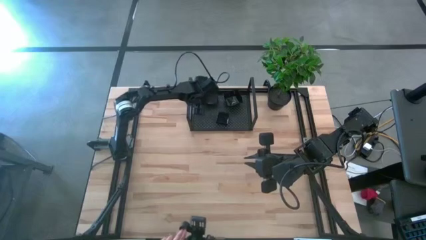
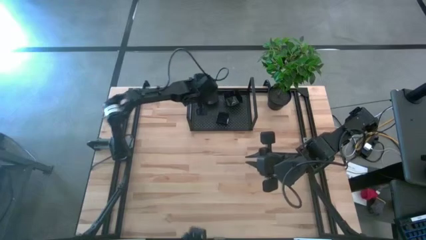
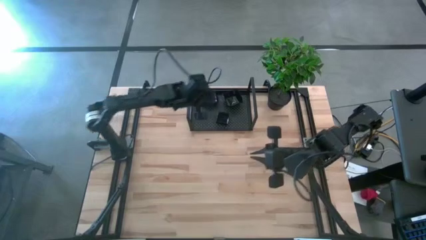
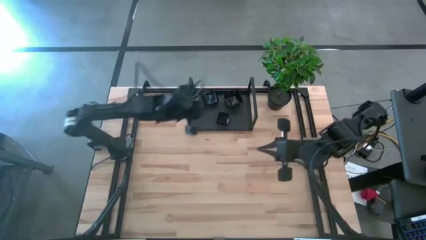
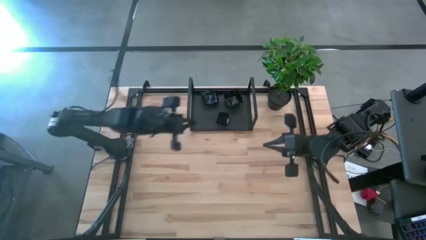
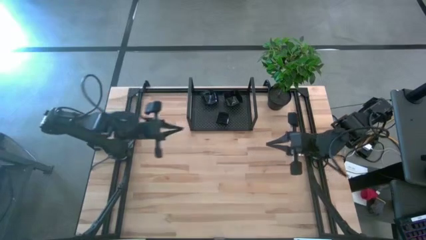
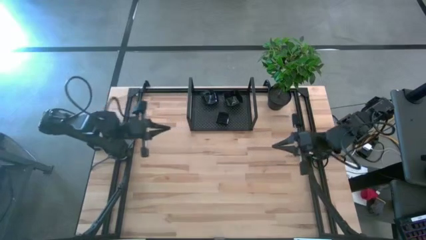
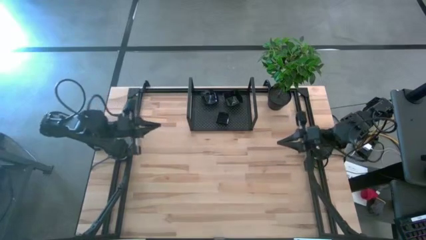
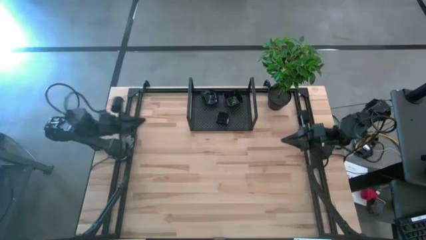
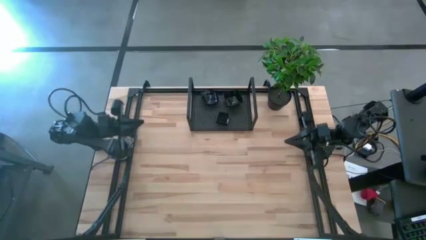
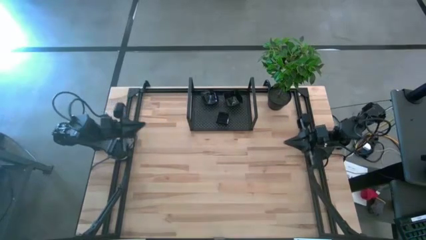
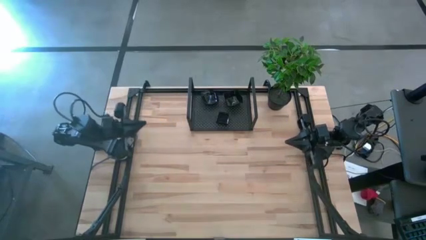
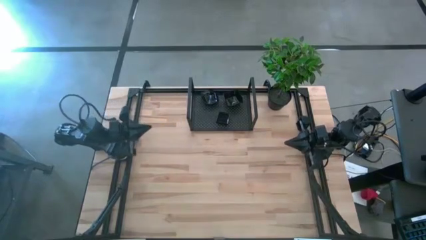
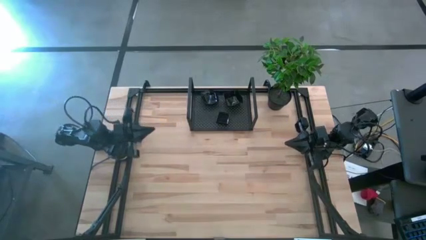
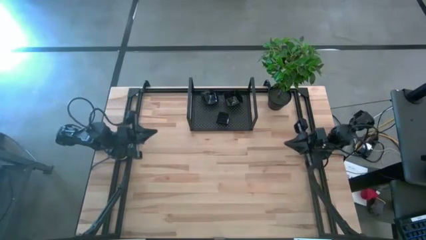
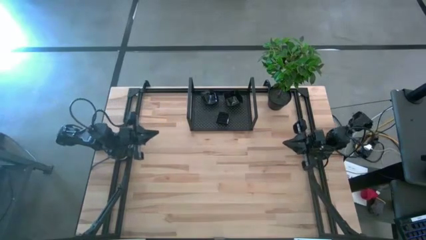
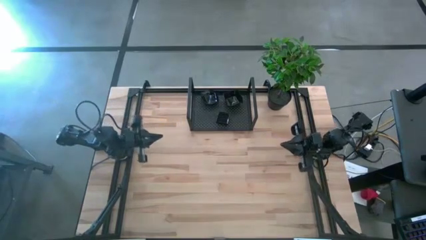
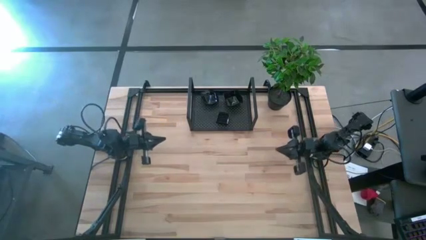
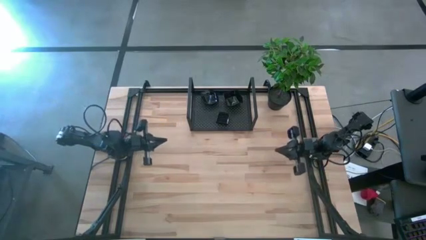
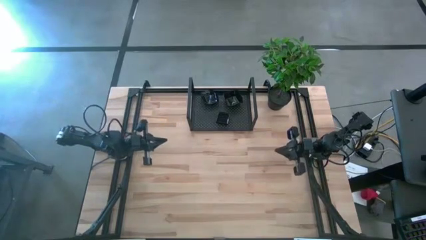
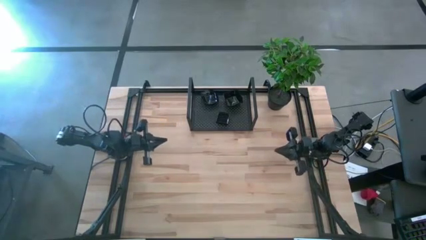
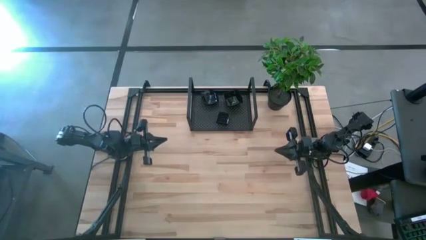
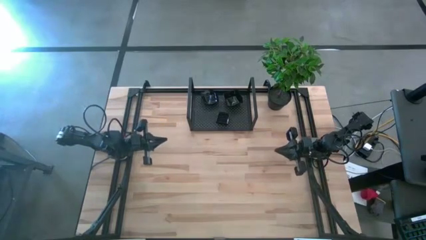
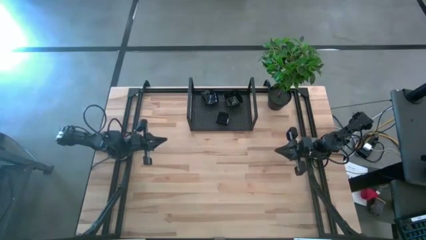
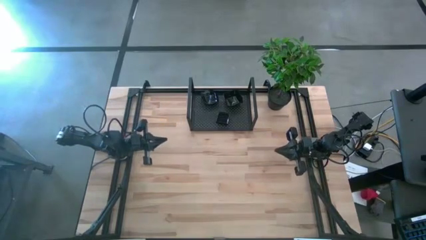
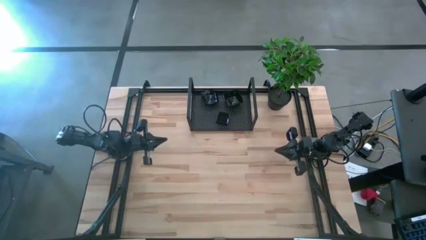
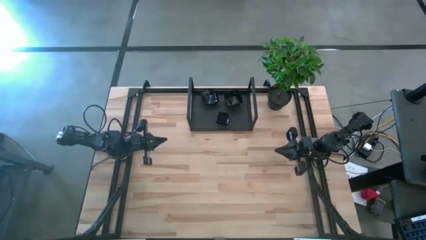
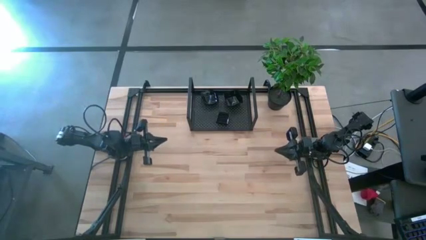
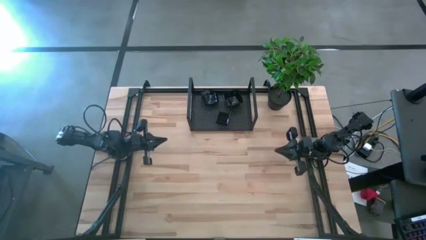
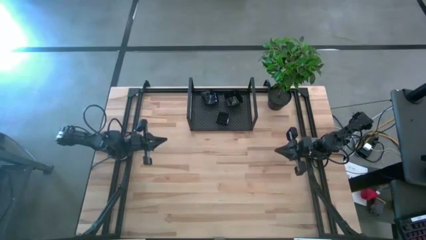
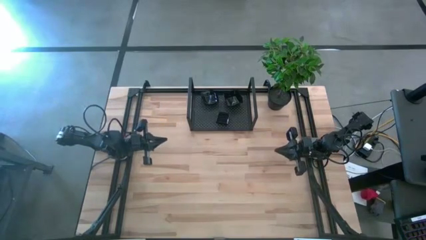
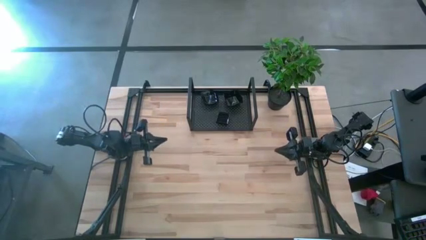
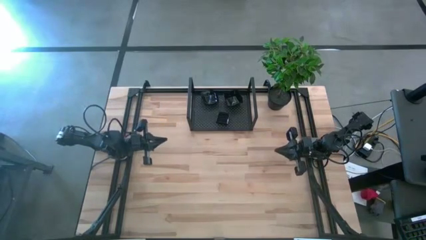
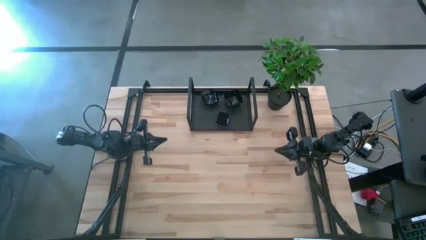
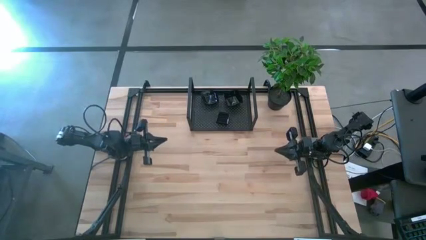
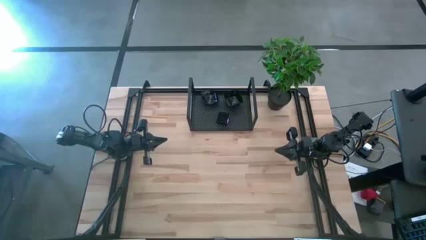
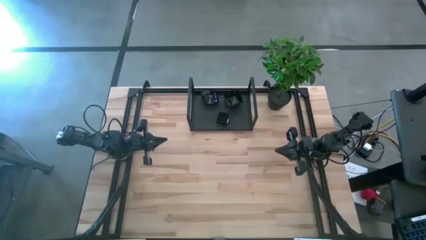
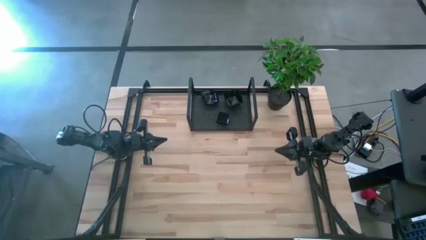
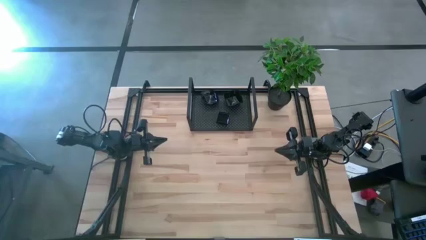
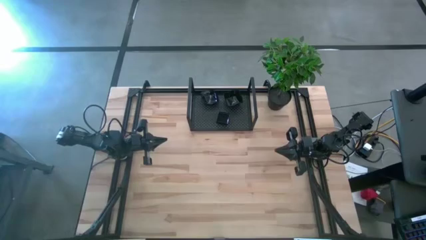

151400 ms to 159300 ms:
Task: Pick & Place Mini shaped plates
Return to Home Position

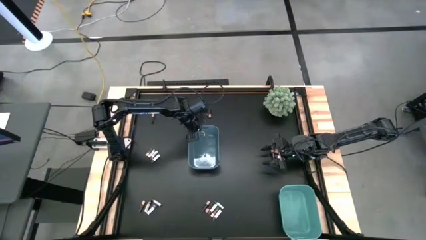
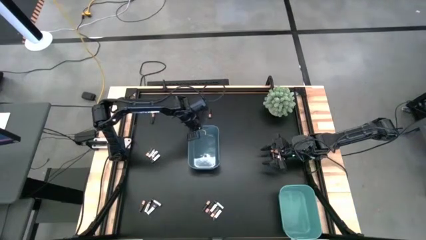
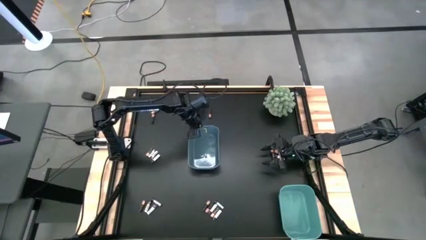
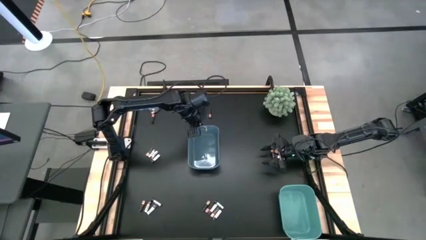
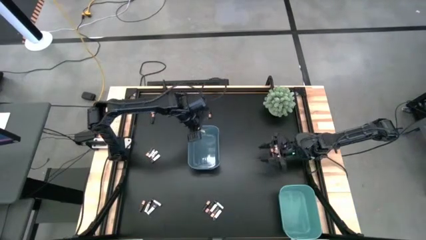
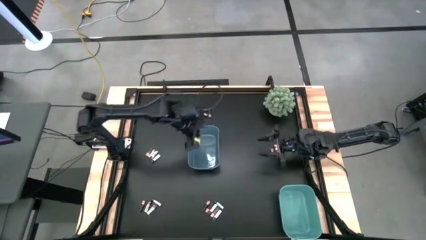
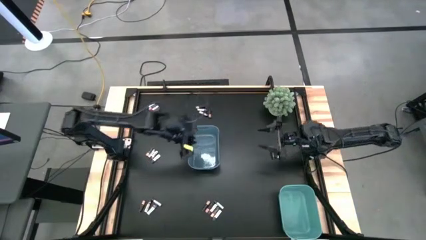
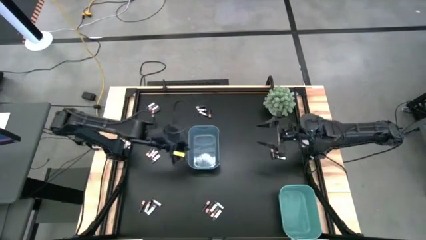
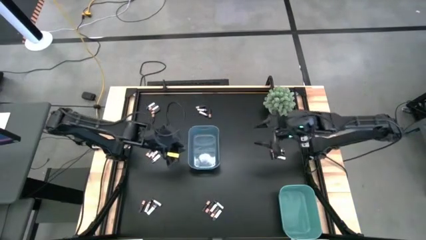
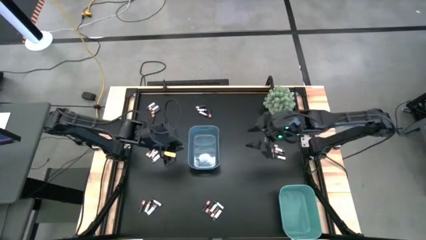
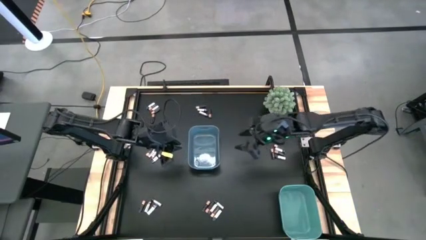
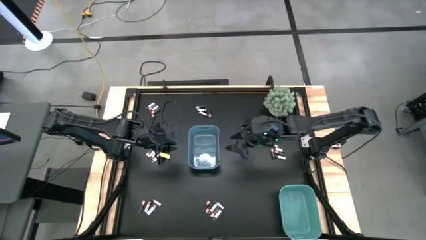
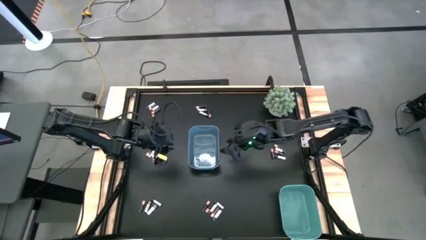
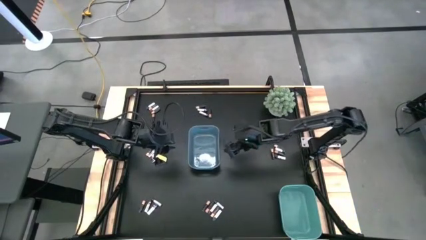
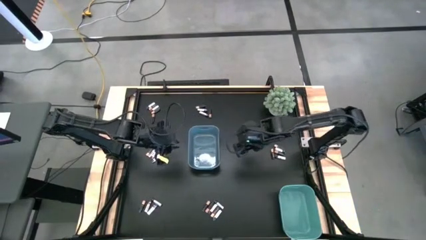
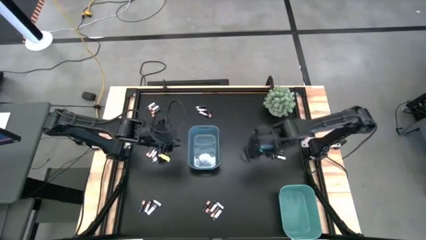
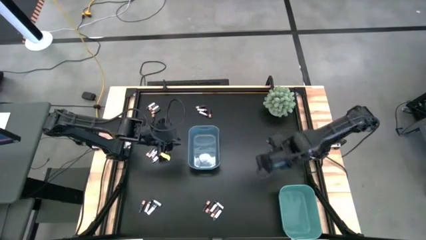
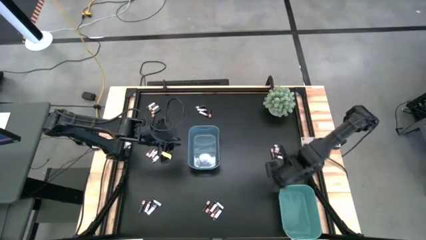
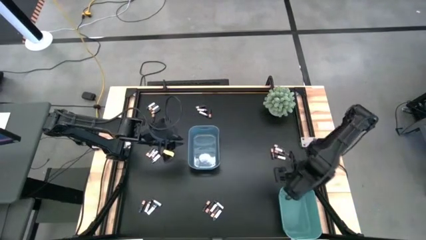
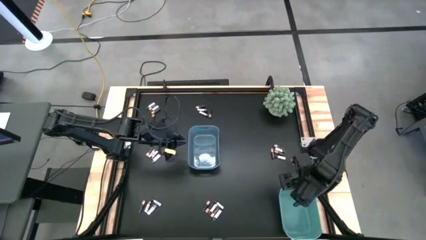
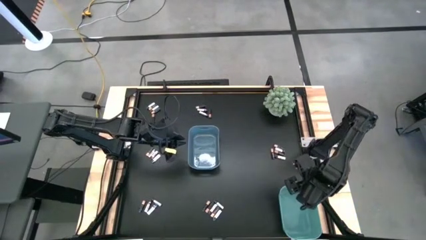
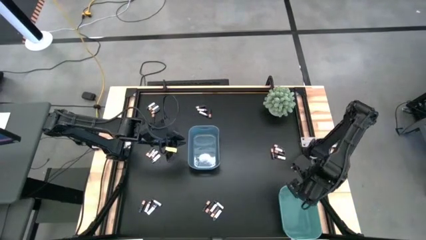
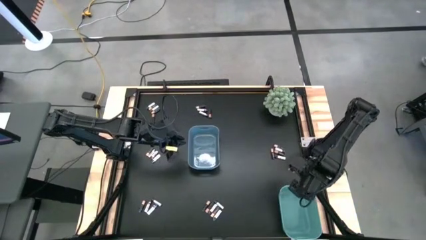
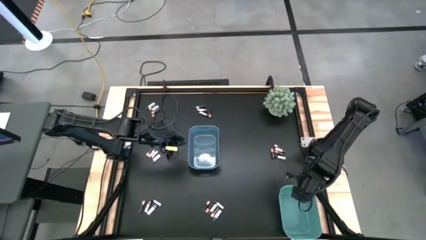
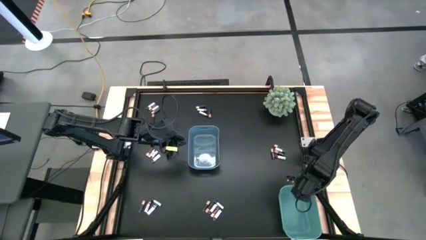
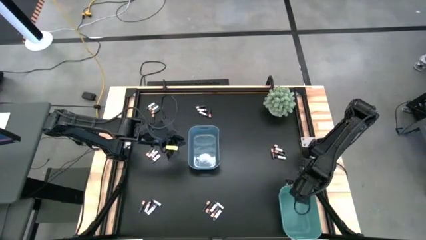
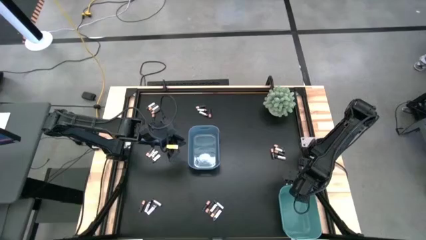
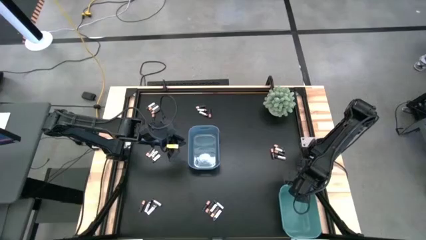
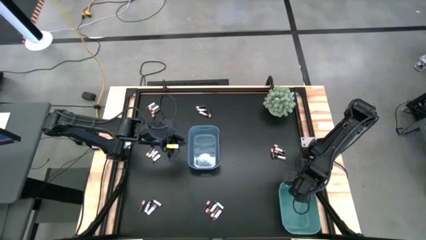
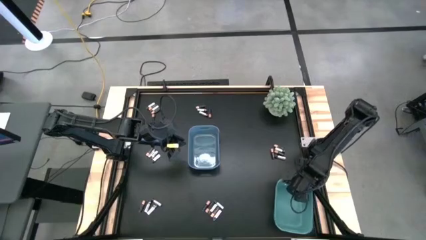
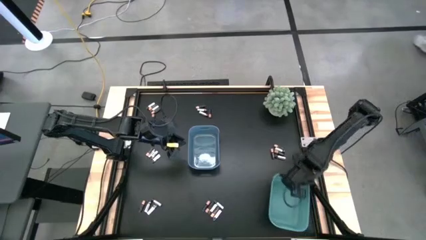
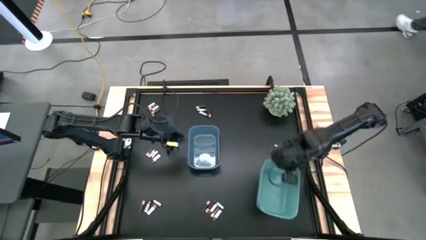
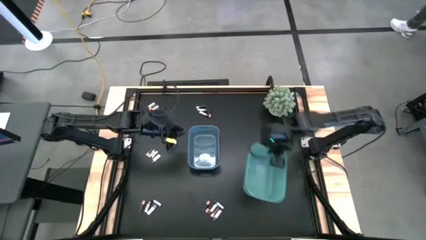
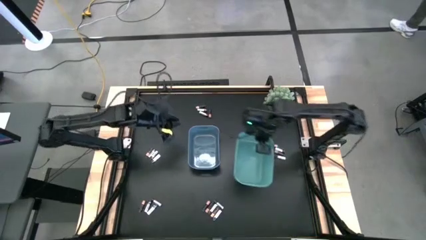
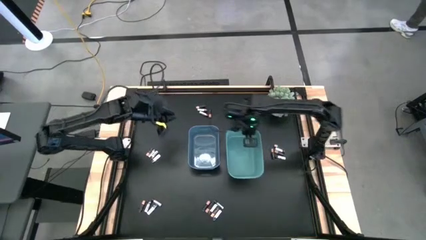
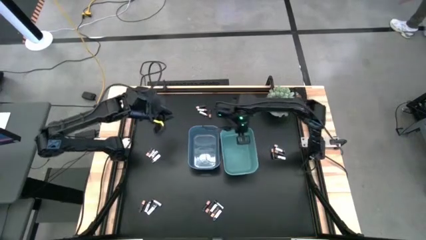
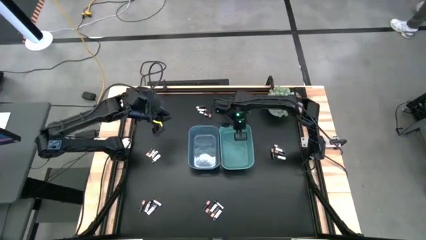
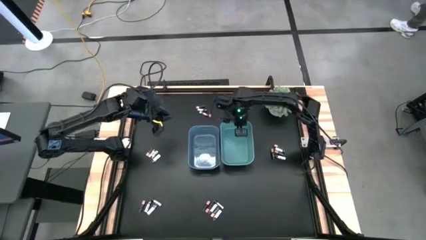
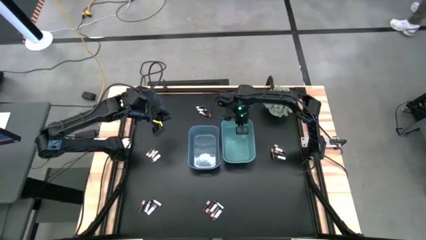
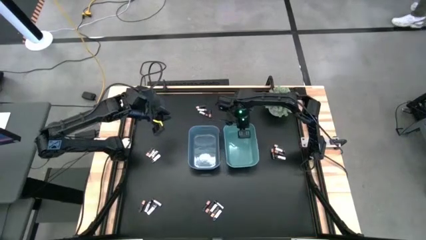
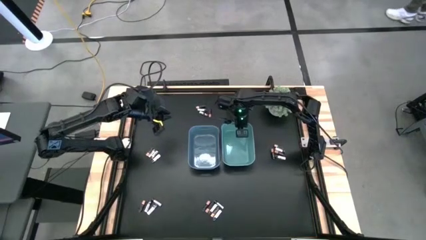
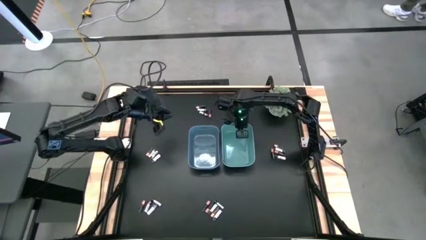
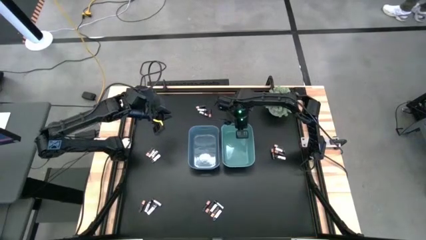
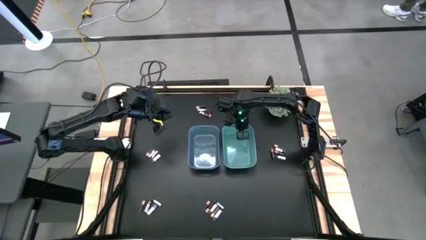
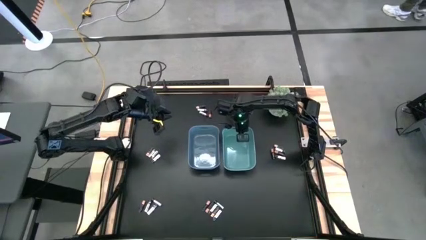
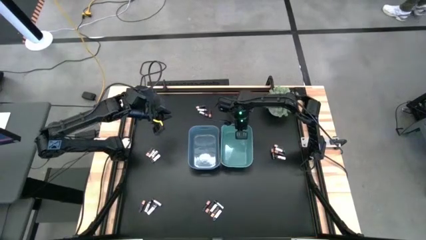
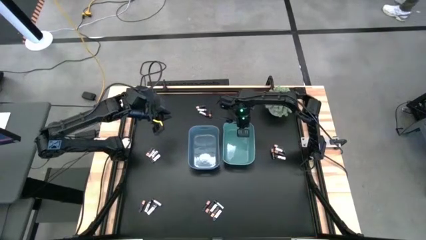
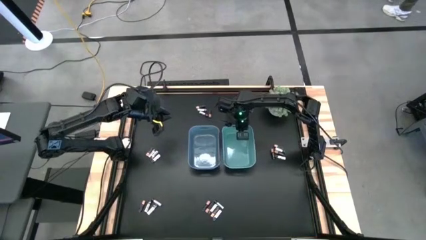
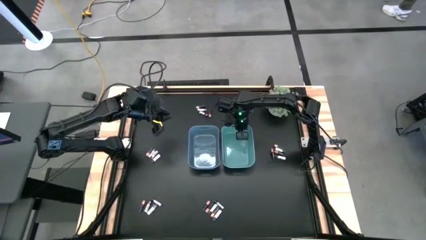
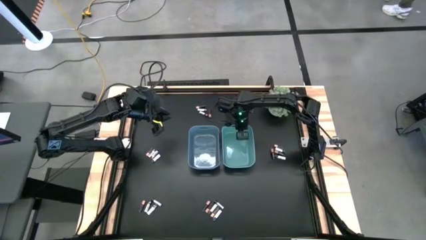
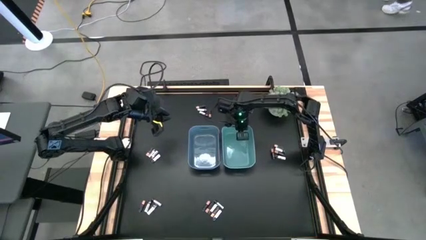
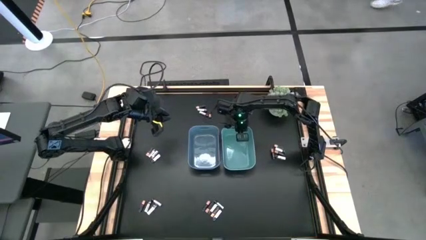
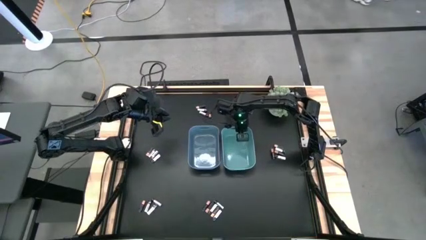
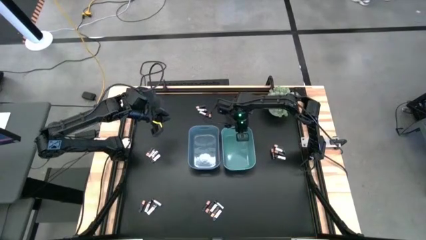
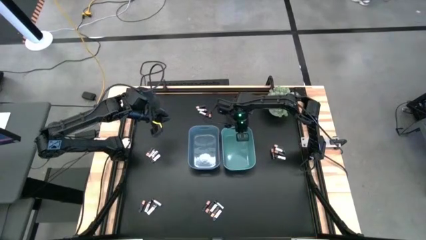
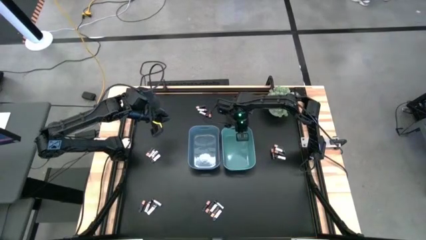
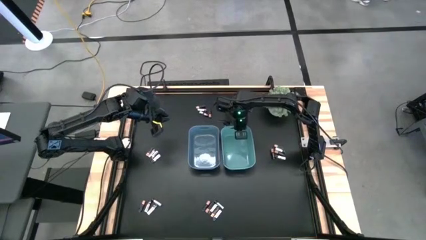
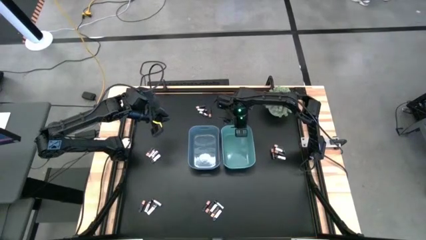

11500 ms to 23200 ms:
Task: Sort batteries
Move the green bin to the right side of the bin
